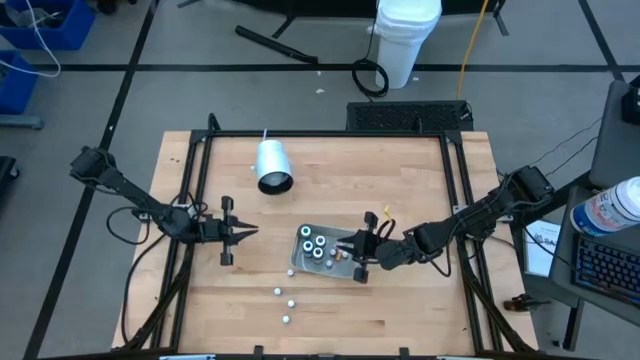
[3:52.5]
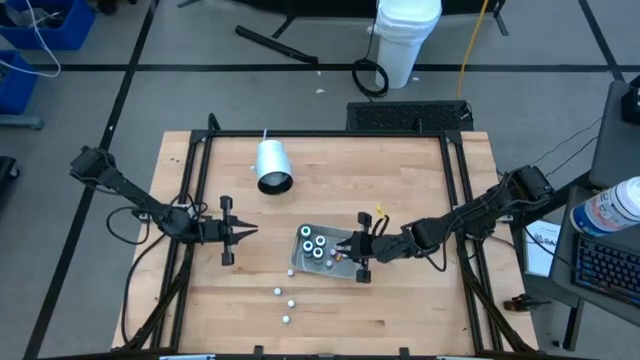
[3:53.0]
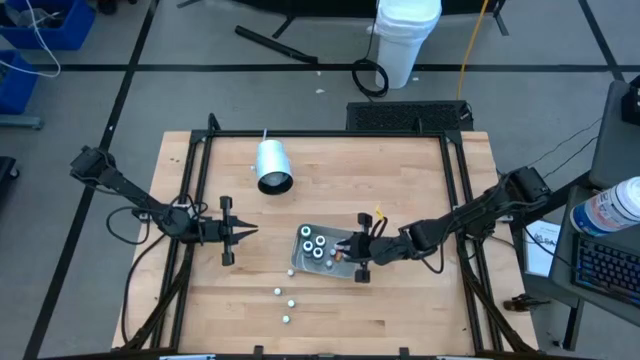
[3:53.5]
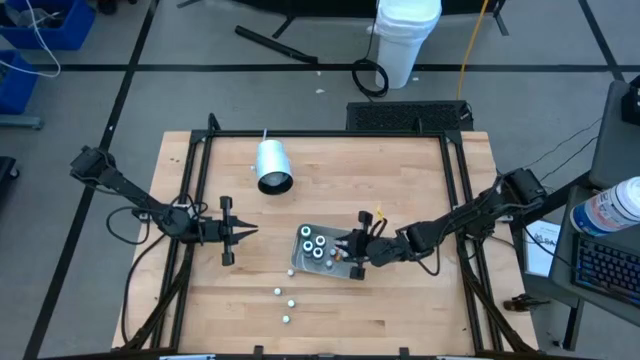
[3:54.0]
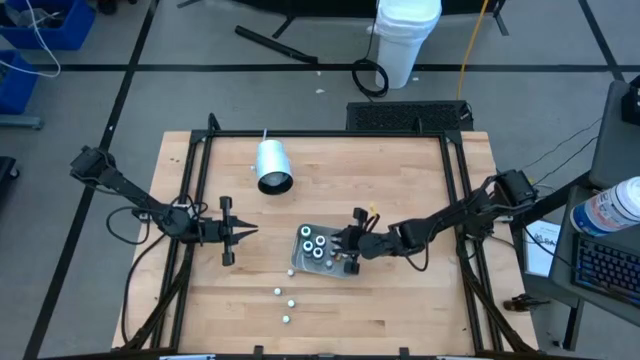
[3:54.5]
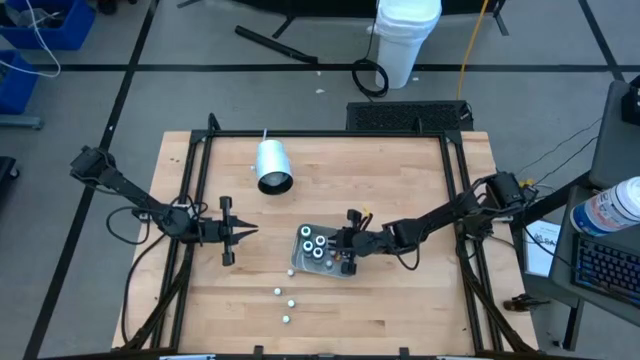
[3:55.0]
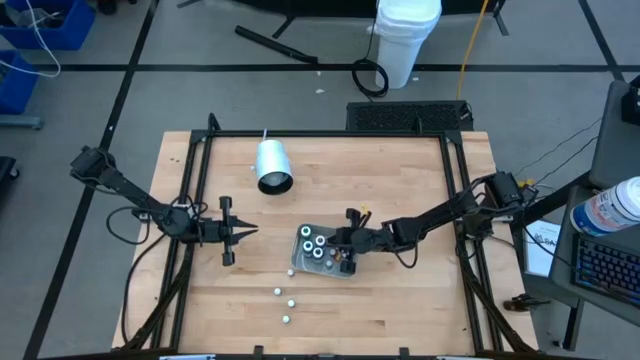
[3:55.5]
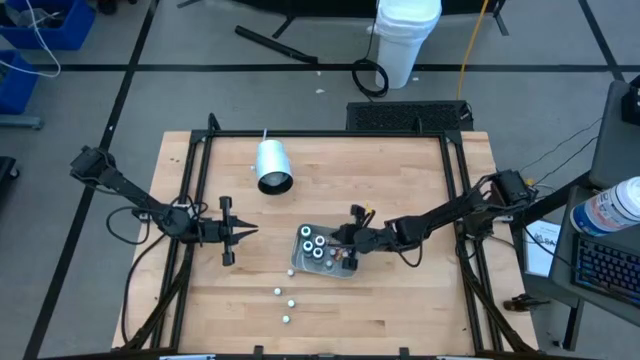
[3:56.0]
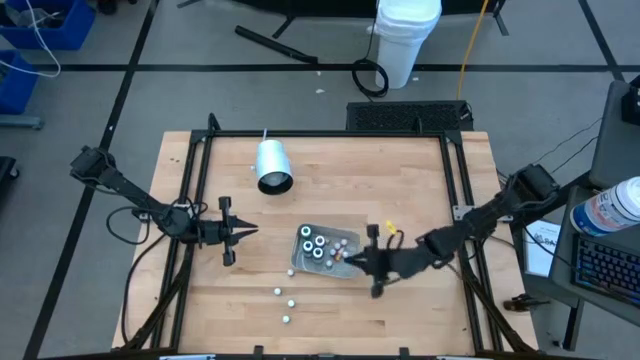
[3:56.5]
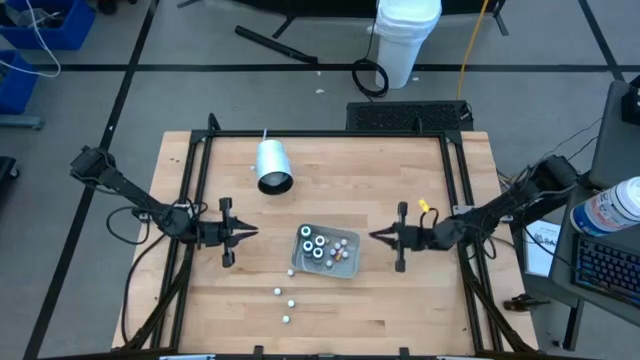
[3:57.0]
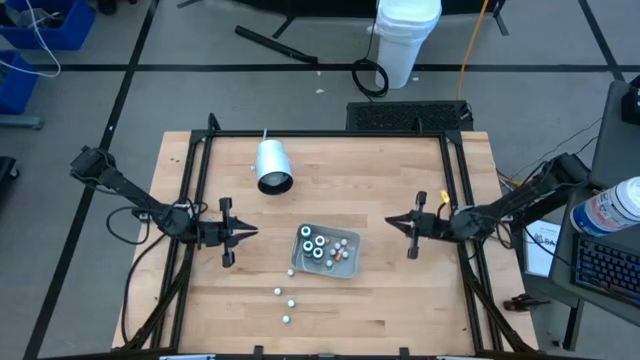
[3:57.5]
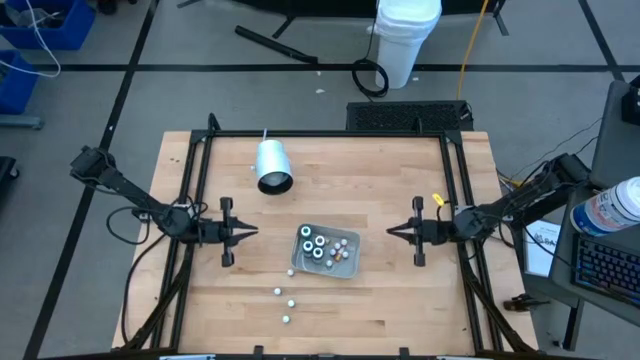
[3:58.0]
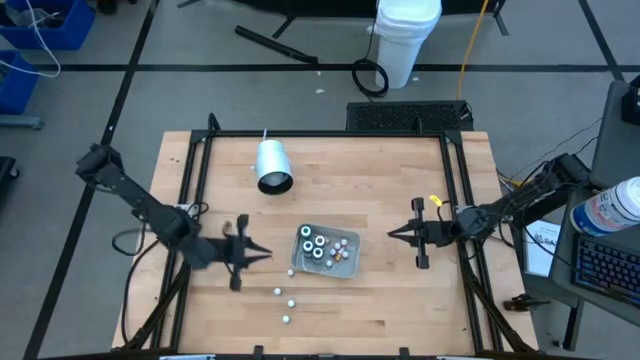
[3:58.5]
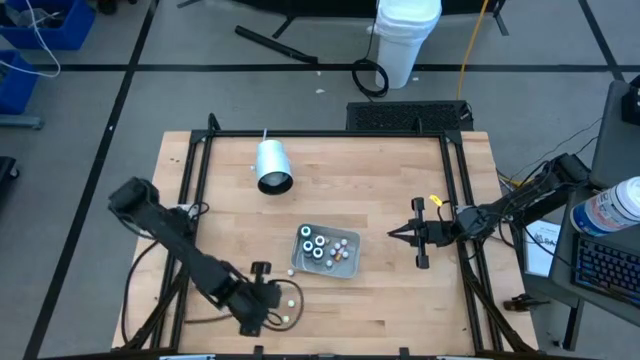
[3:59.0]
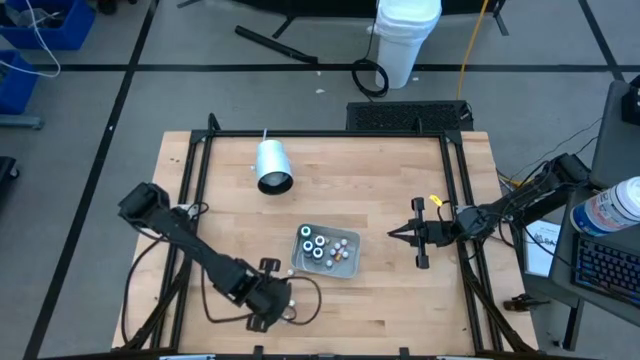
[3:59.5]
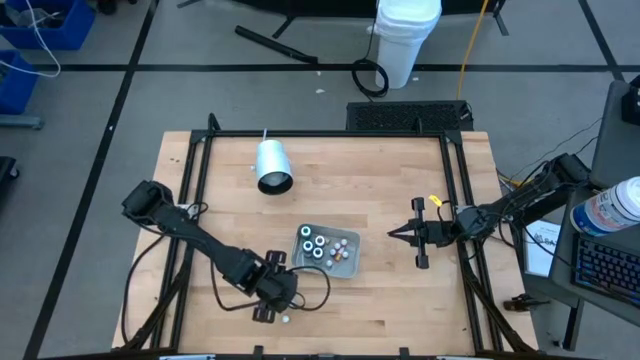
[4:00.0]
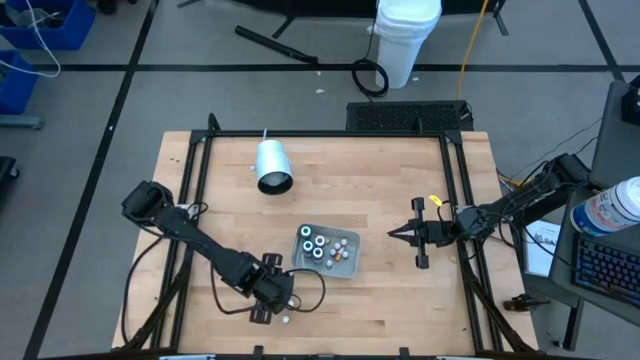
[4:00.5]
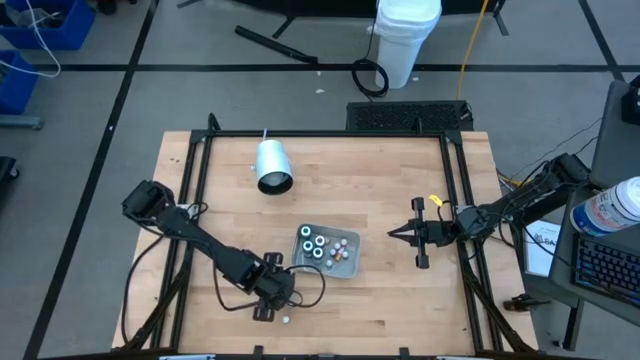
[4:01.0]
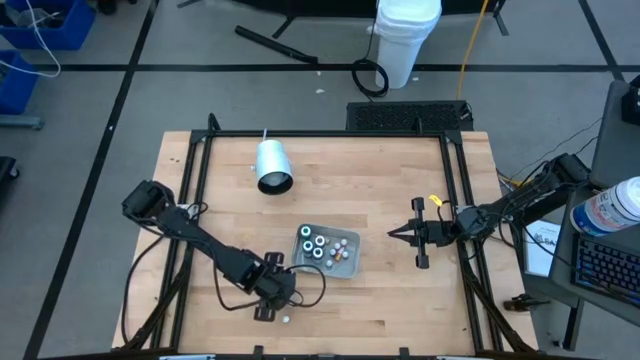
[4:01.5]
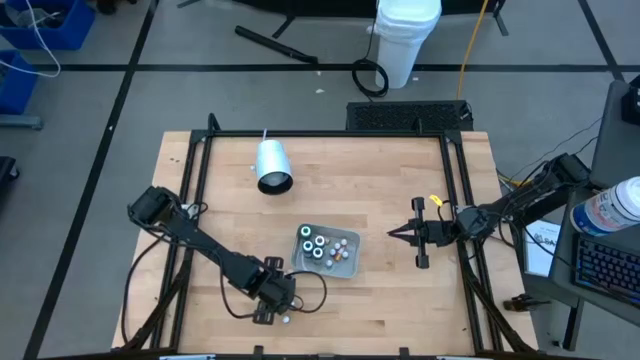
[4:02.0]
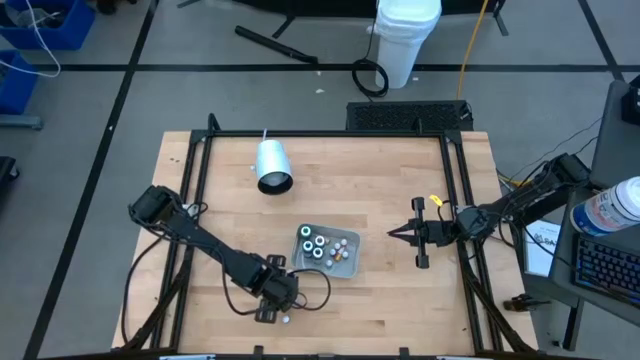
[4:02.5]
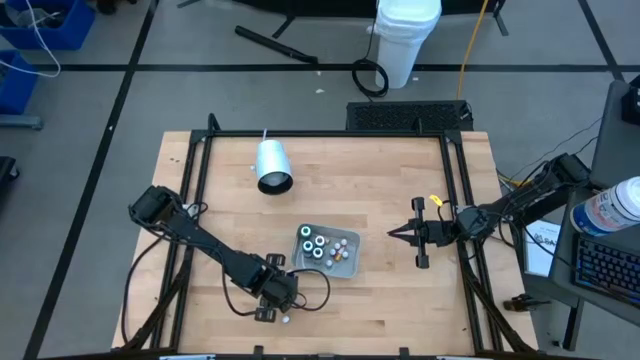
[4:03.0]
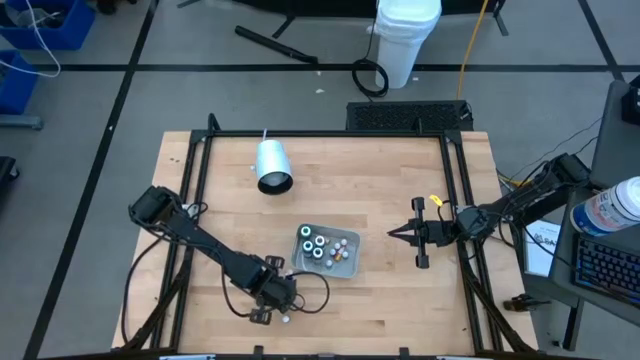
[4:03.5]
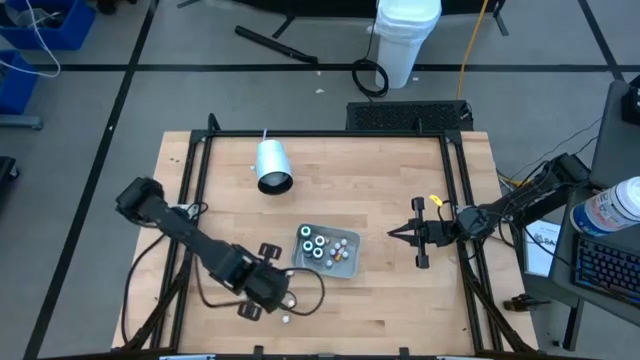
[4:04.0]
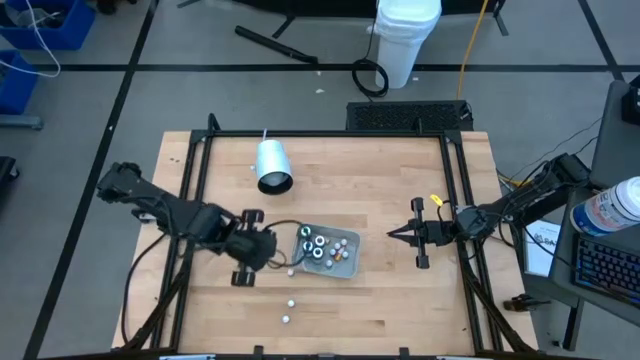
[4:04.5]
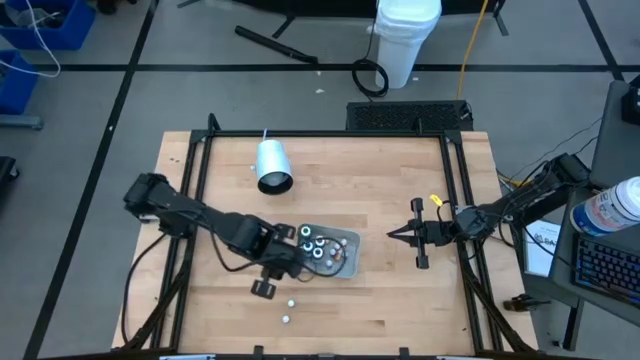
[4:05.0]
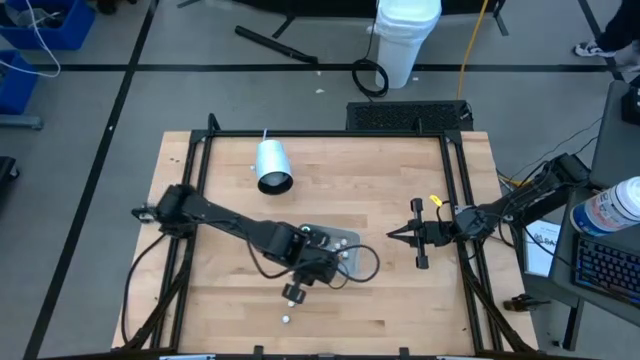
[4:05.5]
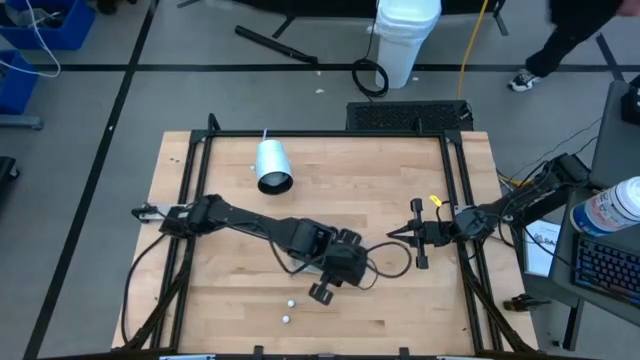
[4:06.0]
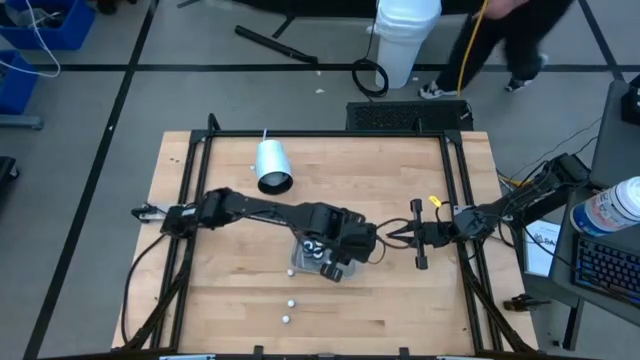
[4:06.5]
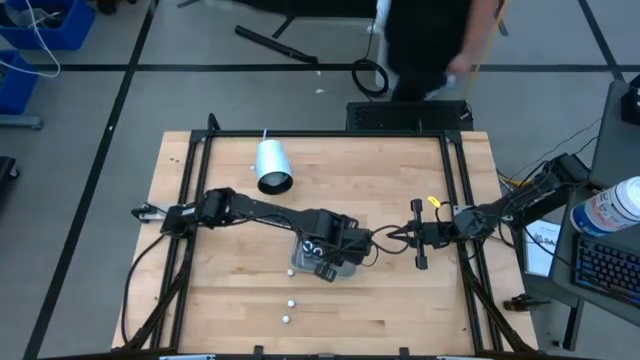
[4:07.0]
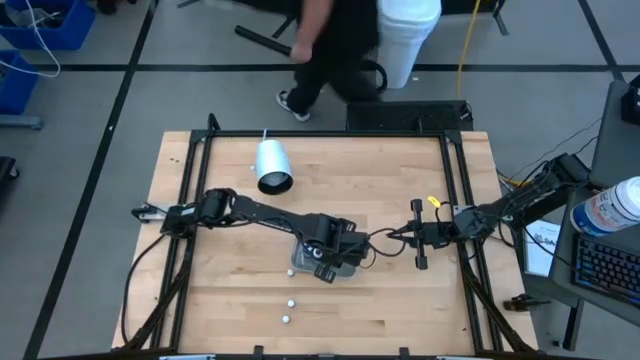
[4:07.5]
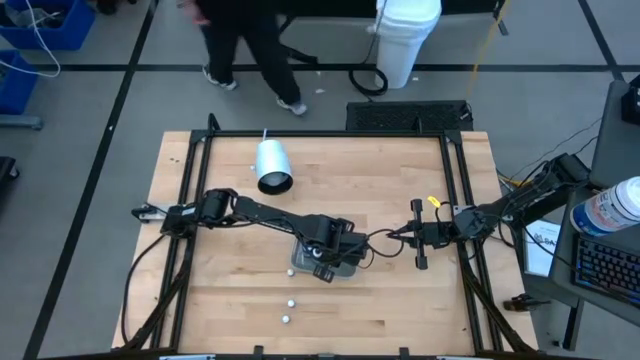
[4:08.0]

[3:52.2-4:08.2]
Task: Pick & Place food coloring
Put the black food coloring bottle into the gray bin
